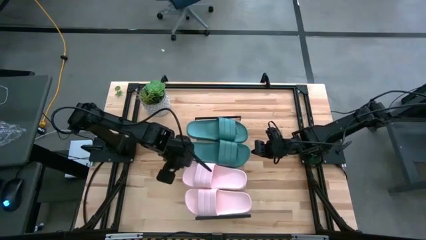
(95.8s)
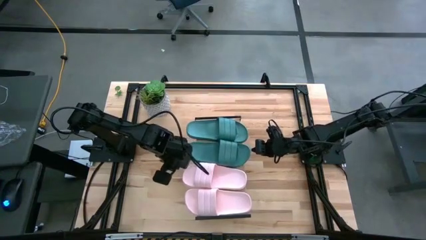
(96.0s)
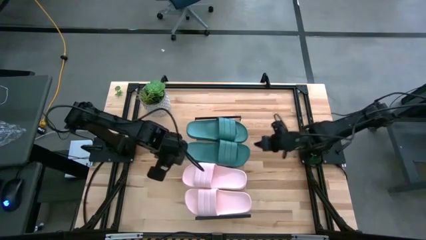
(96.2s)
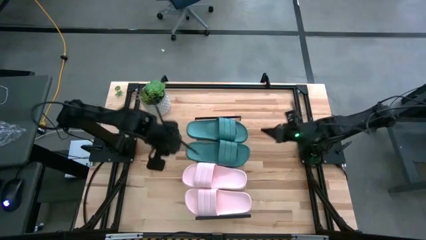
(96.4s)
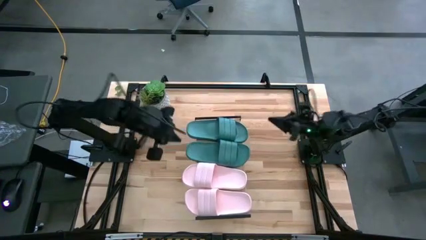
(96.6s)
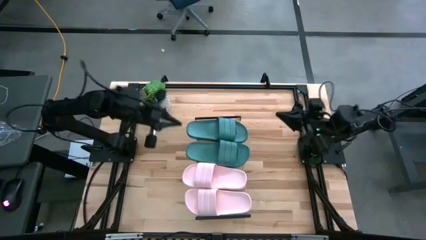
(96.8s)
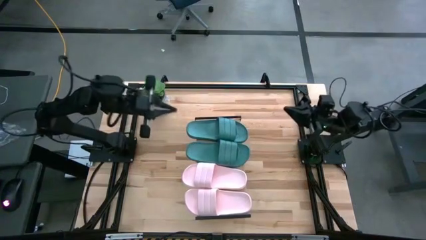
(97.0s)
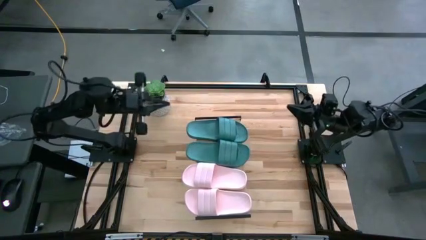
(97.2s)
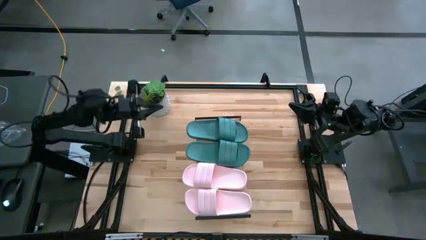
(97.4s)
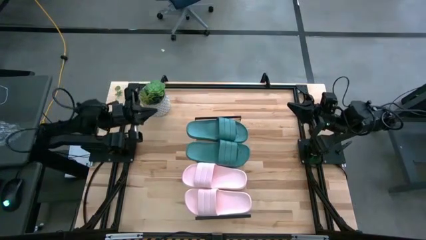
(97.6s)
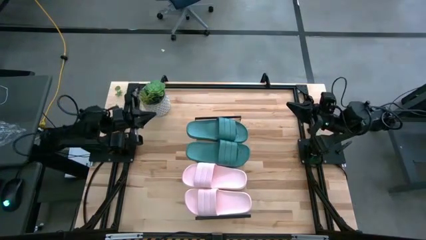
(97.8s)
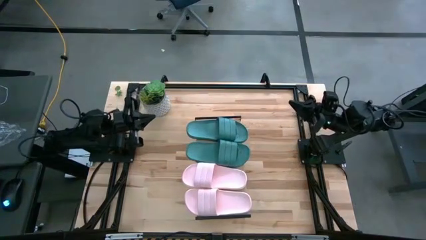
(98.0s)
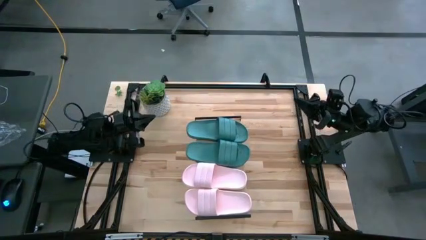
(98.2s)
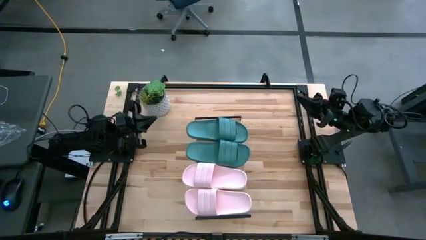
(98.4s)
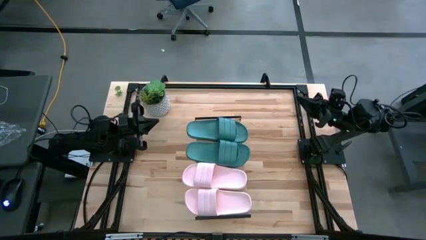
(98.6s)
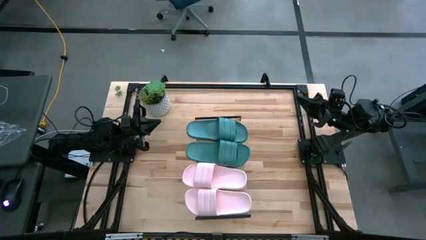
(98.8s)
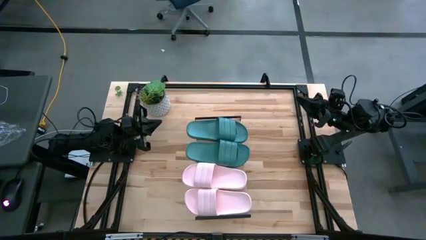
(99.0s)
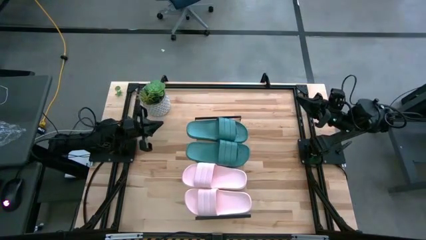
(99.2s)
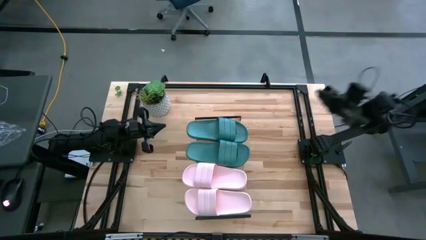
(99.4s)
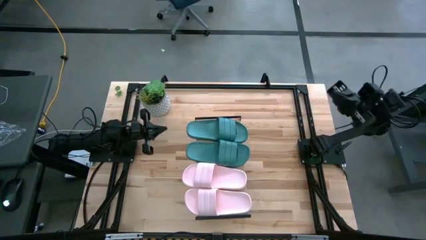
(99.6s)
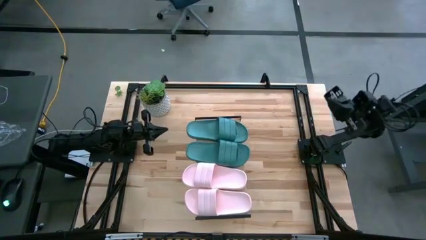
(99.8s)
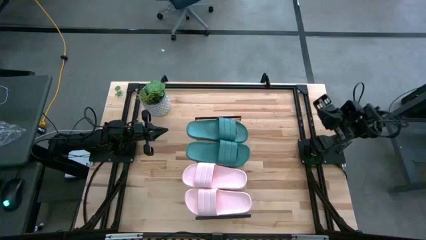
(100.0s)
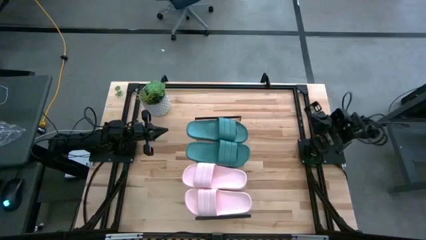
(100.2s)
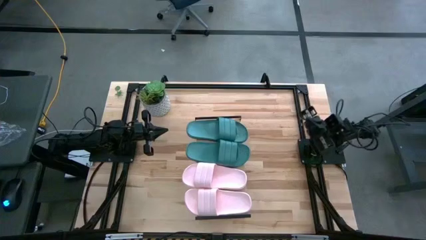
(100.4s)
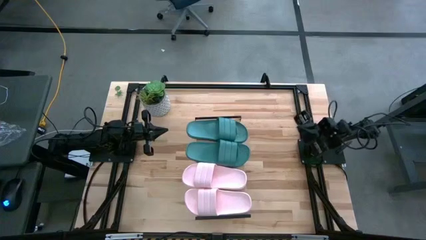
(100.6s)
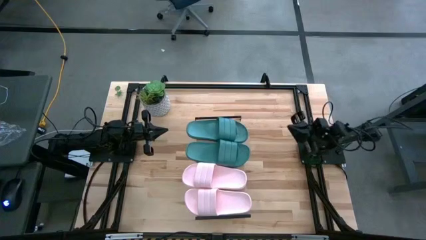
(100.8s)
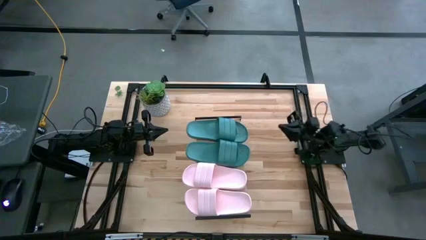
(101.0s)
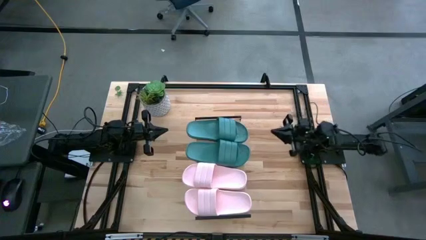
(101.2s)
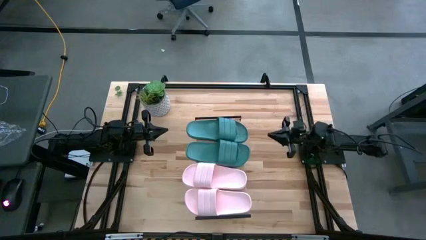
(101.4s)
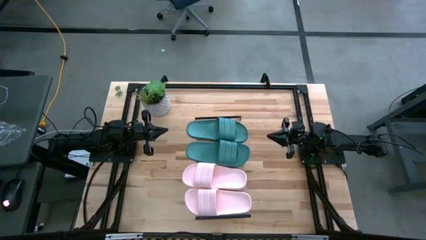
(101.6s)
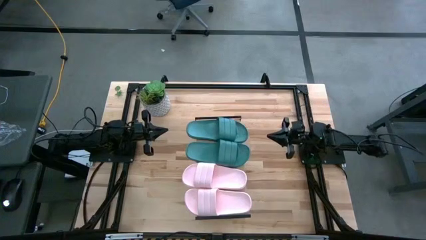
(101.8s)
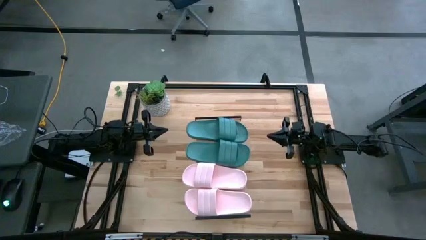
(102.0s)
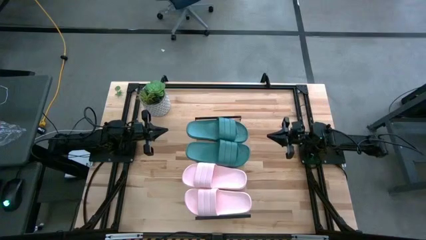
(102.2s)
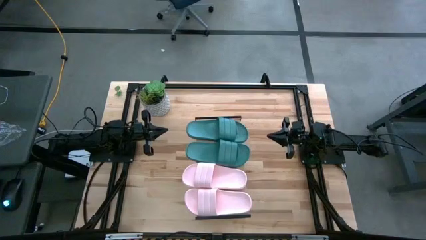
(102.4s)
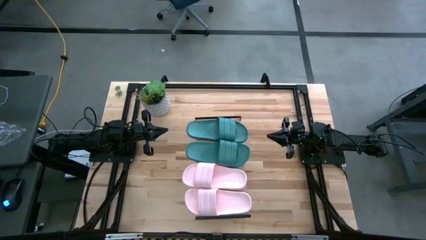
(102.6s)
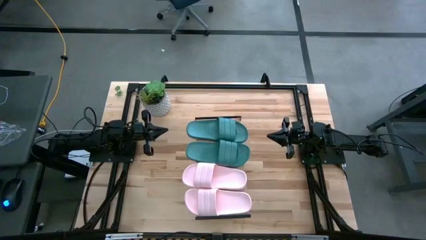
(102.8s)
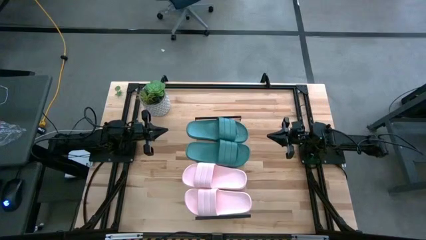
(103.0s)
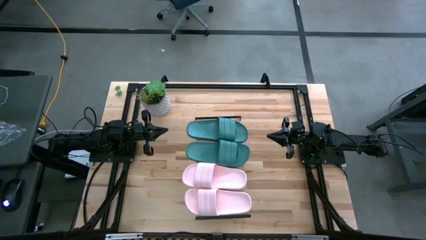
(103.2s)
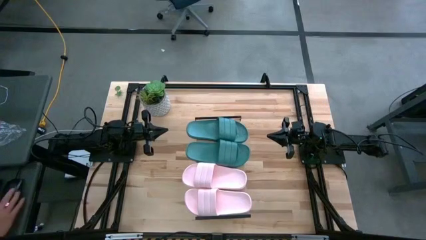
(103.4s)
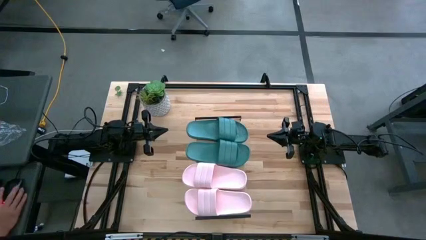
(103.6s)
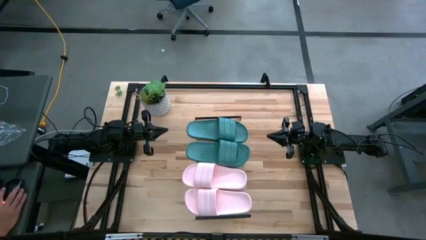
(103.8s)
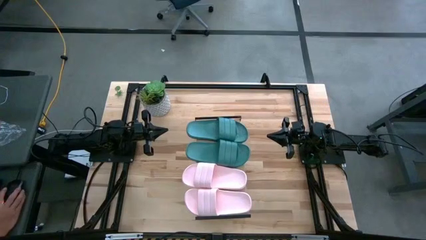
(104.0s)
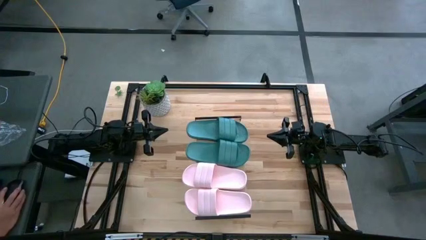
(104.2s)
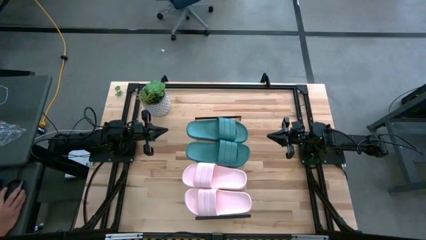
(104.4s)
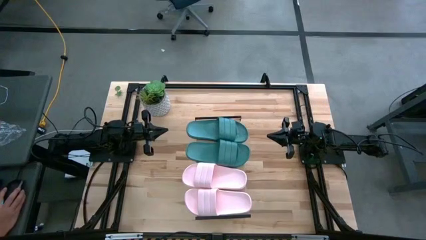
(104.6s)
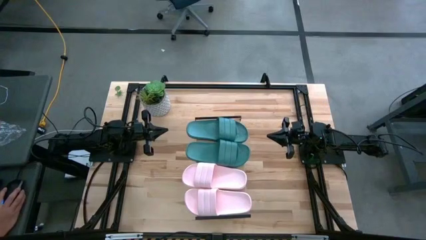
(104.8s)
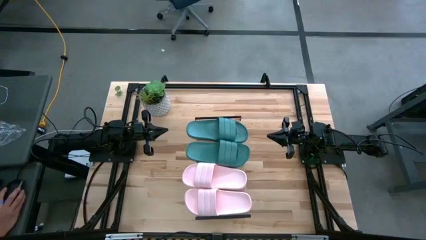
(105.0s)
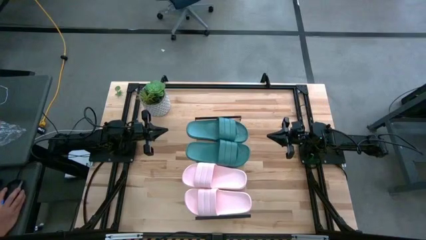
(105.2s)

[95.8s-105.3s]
Task: Pick and place slides into the shelf
Return to Home Position
